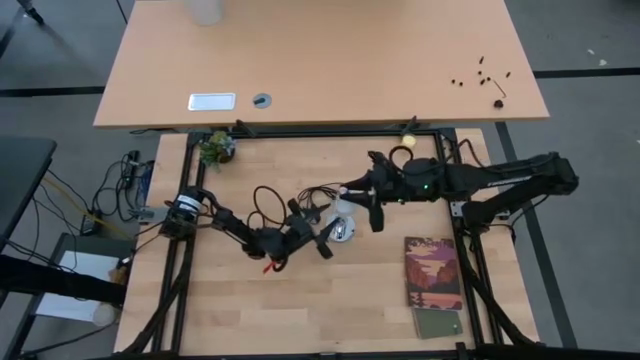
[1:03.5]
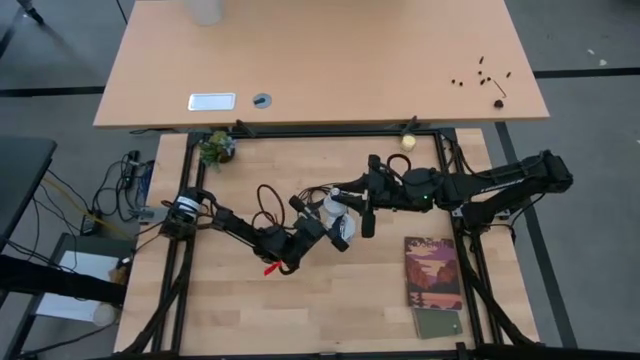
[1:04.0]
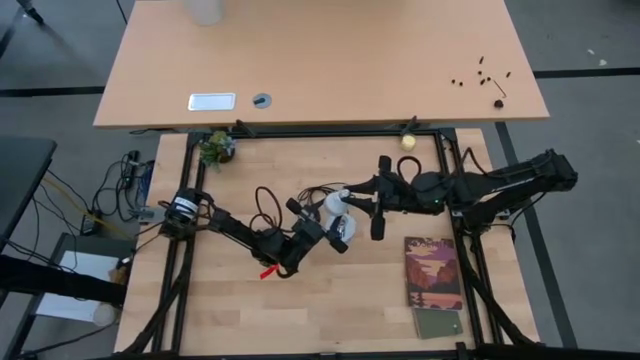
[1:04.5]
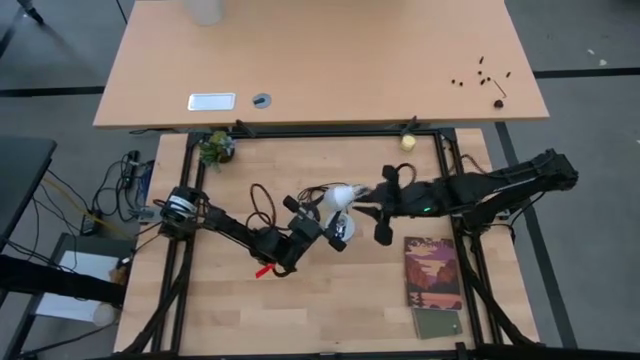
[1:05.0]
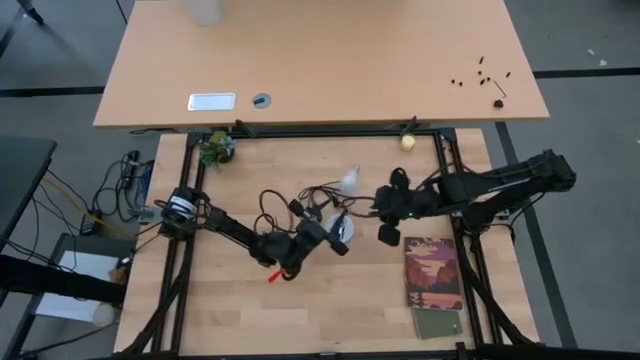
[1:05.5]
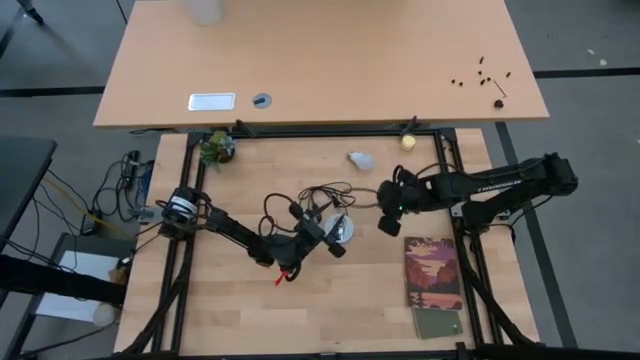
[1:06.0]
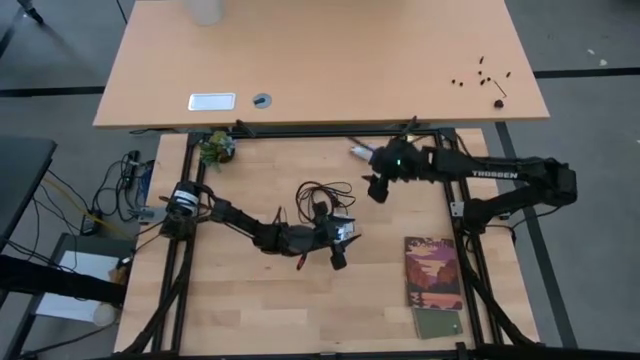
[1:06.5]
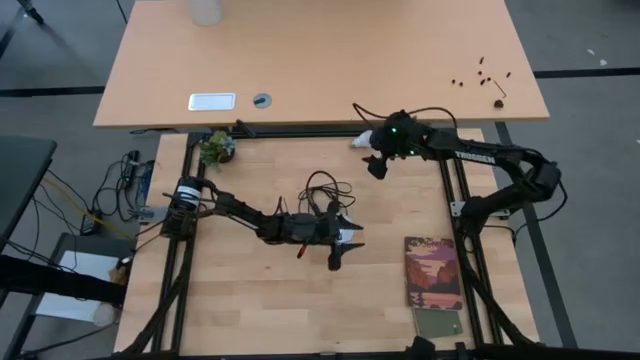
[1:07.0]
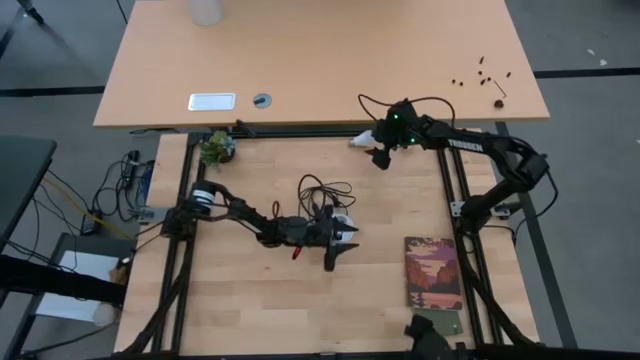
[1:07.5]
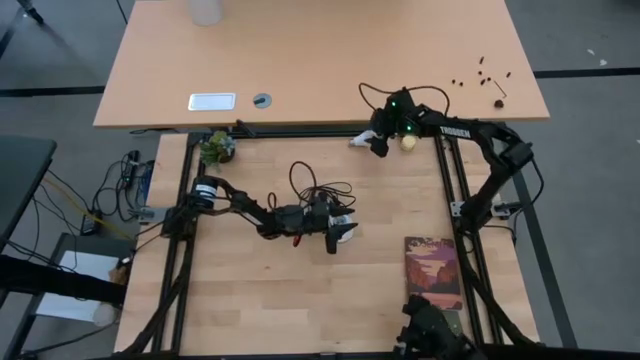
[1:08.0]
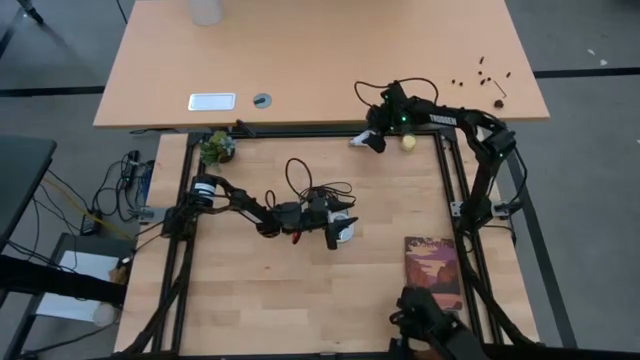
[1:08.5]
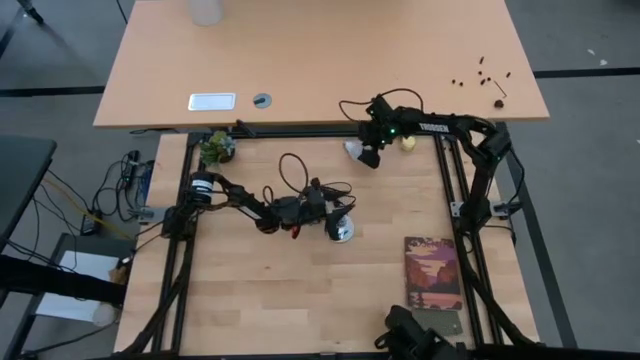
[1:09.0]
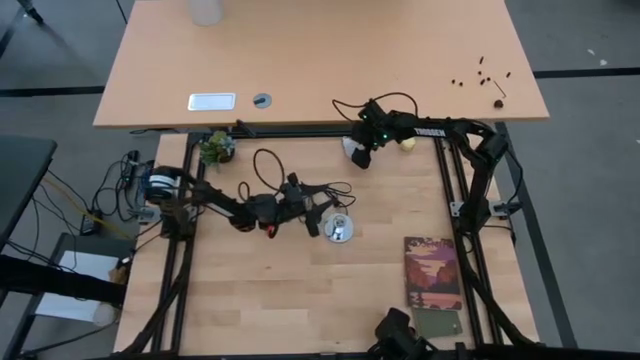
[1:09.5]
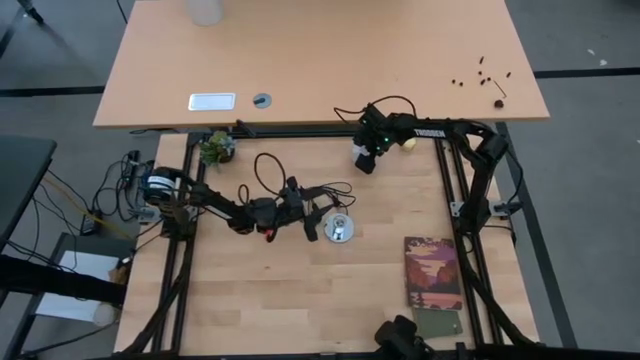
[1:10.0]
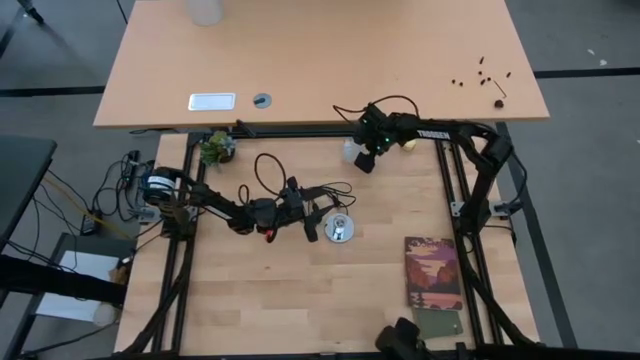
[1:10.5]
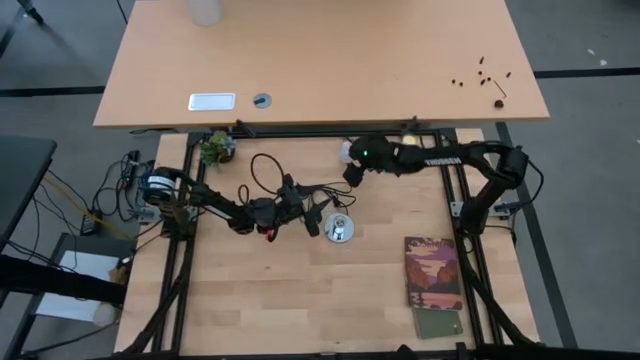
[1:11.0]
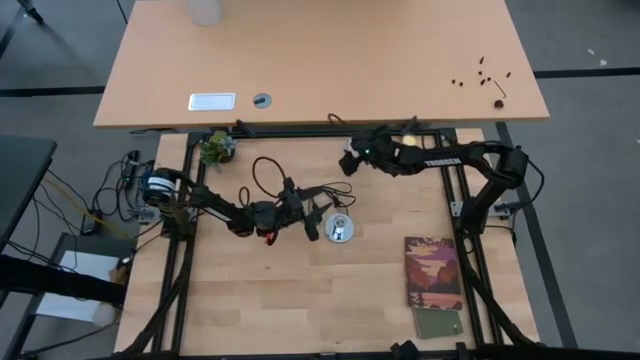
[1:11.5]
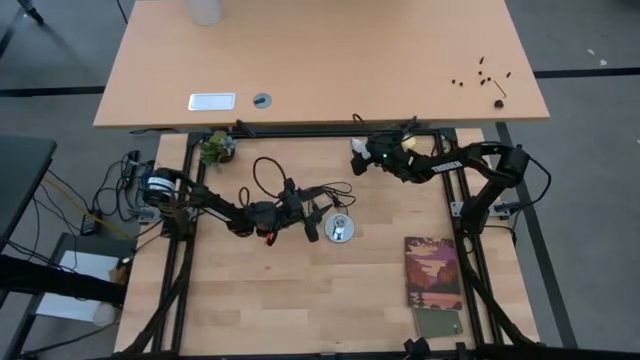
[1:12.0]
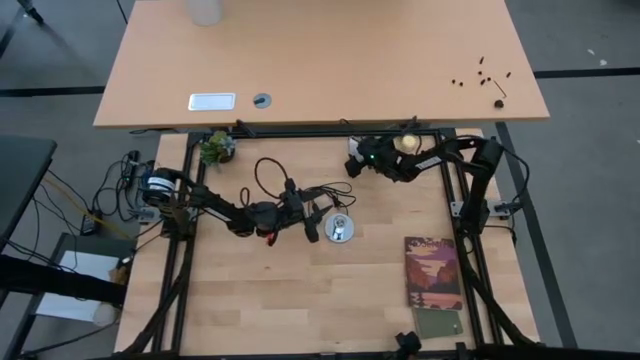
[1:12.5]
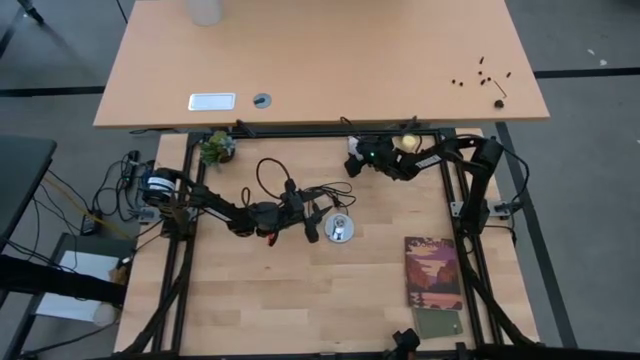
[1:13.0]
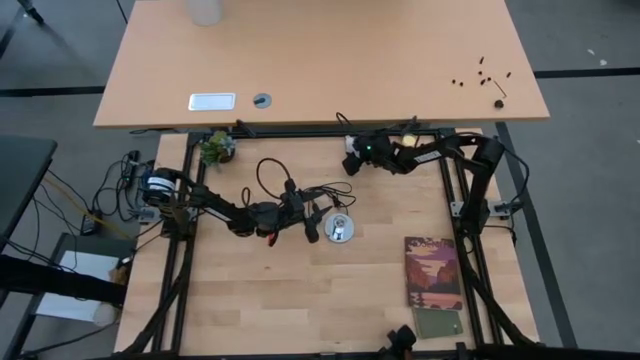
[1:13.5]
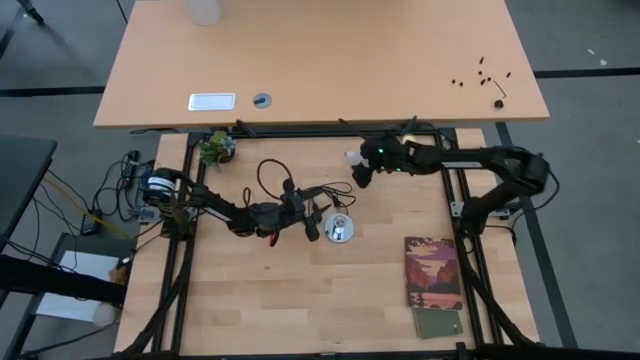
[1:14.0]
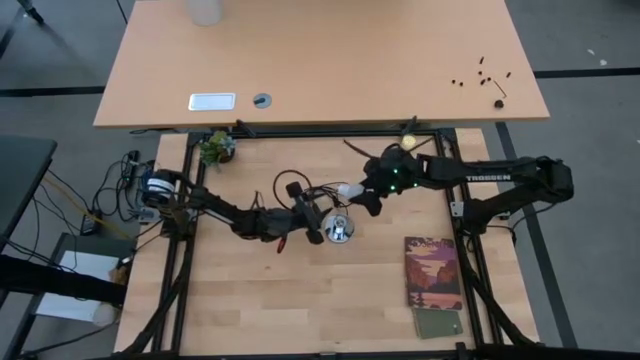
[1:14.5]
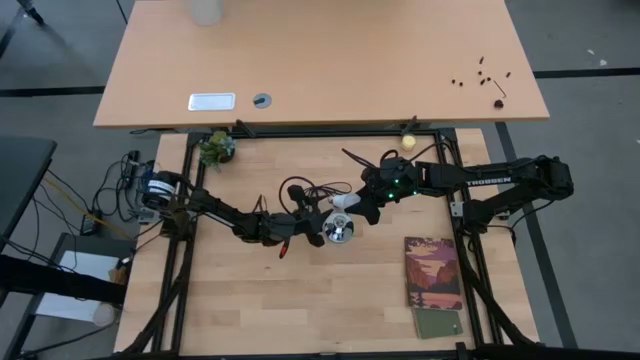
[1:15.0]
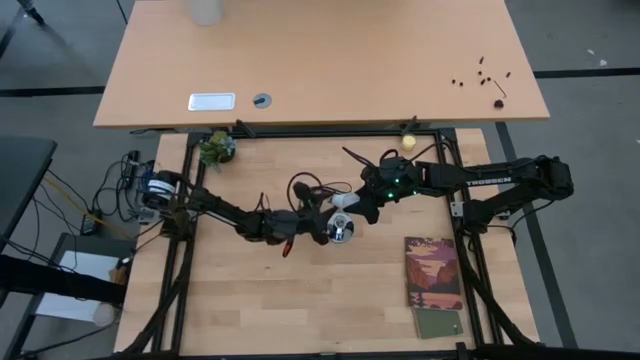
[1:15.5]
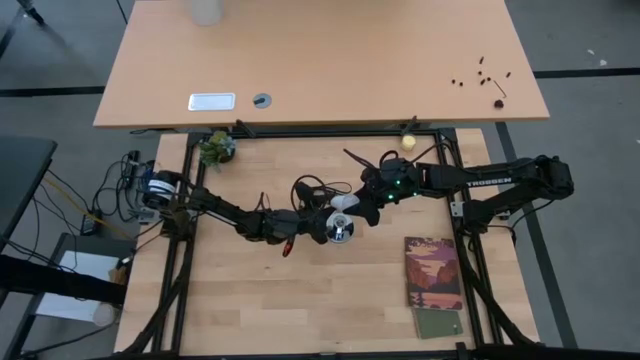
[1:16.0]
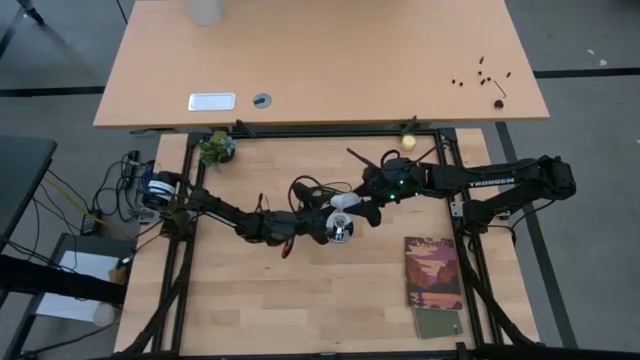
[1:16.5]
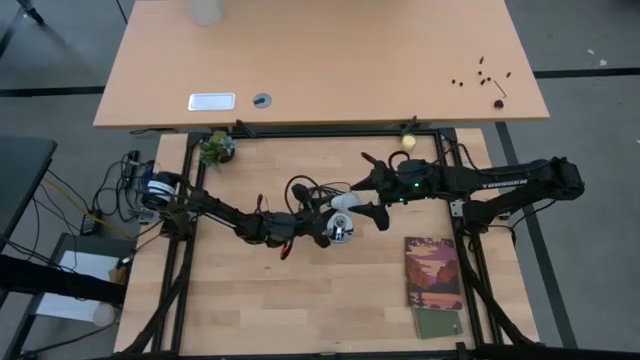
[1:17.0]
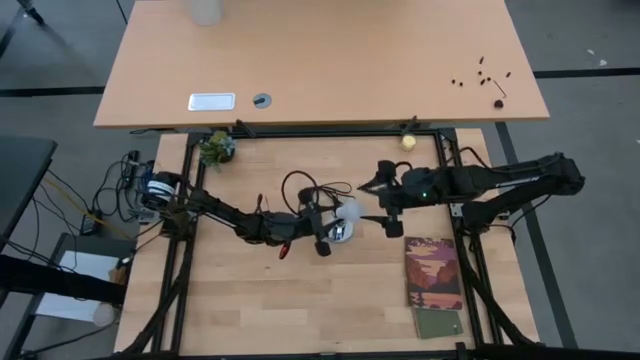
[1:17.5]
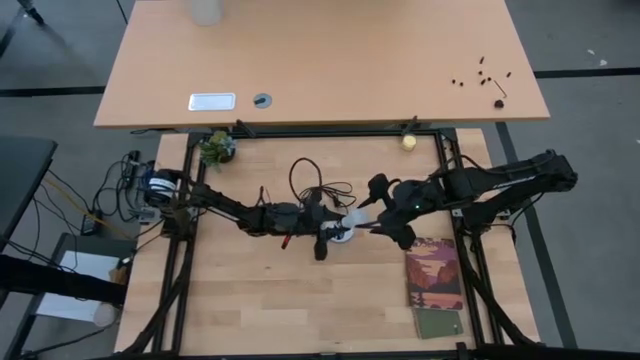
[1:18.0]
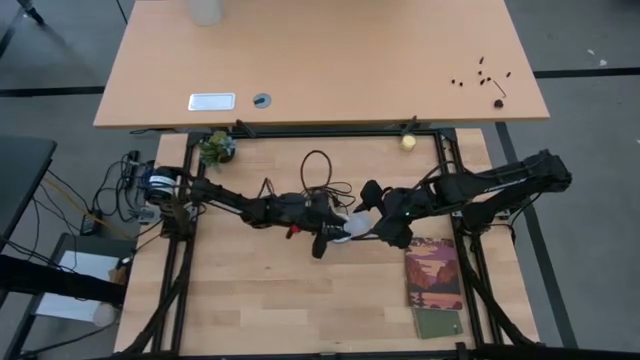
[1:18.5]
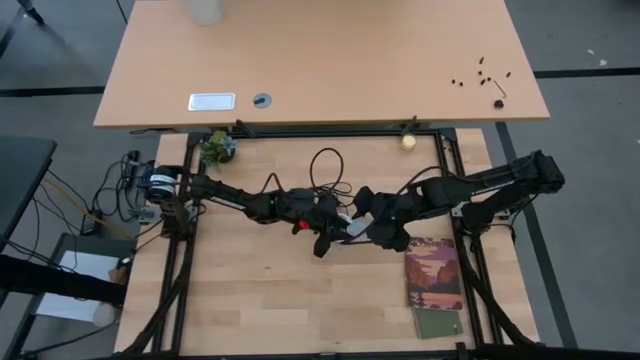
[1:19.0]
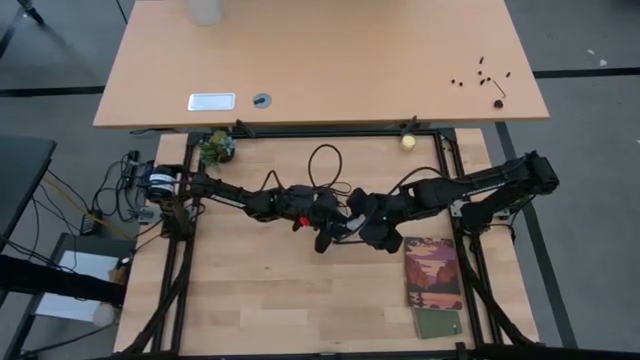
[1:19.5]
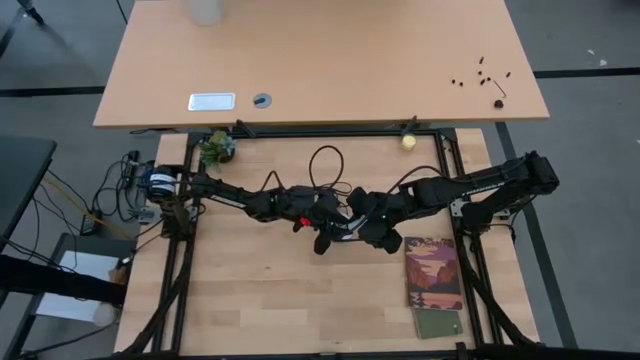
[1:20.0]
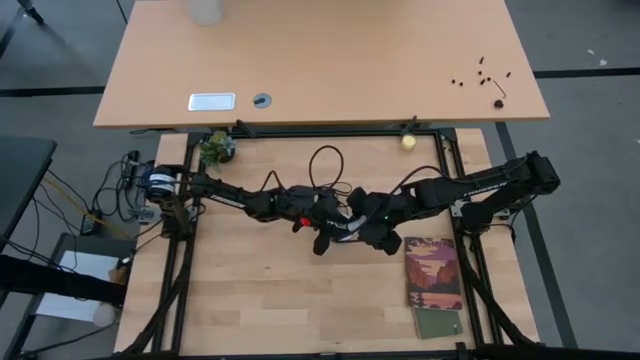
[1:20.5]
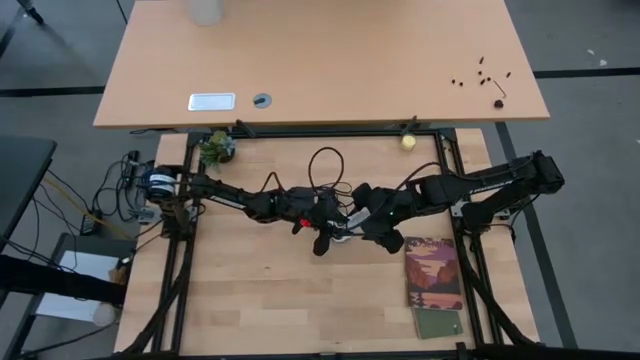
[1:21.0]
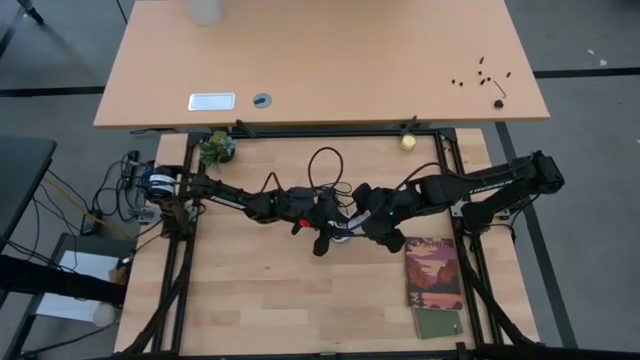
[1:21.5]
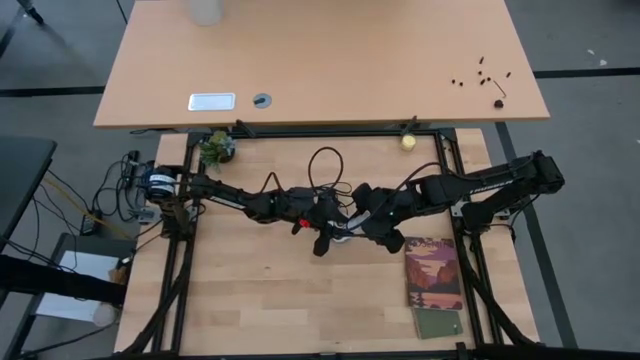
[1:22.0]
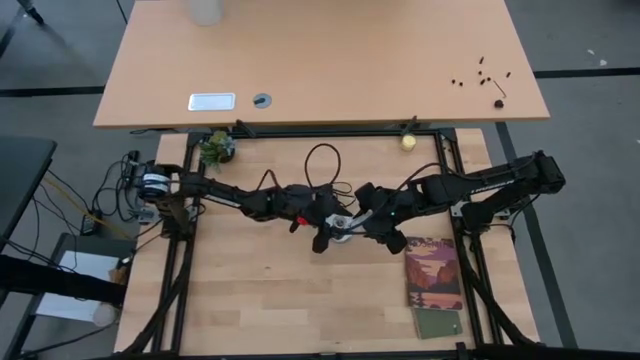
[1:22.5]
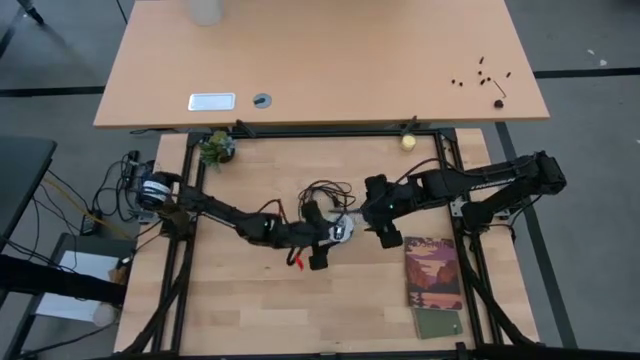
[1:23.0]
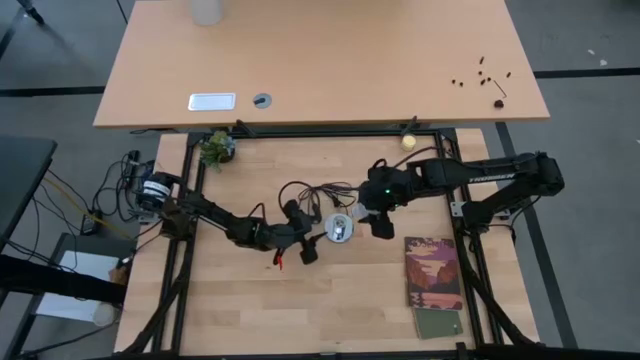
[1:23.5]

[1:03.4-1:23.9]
Task: Screw lightbulb
Insert the white lightbulb into the silver lamp

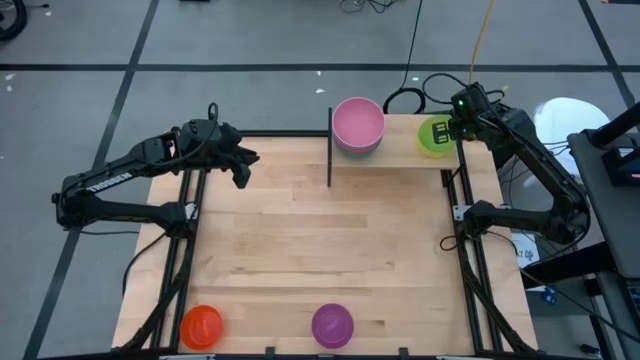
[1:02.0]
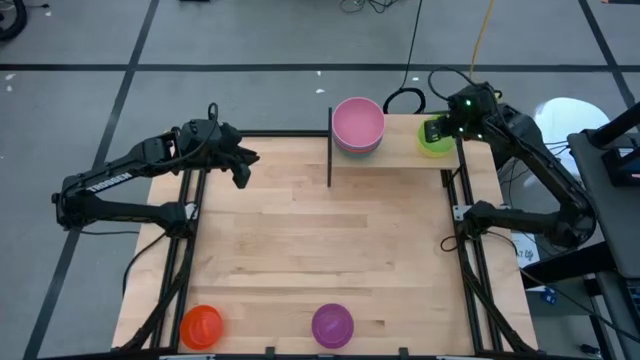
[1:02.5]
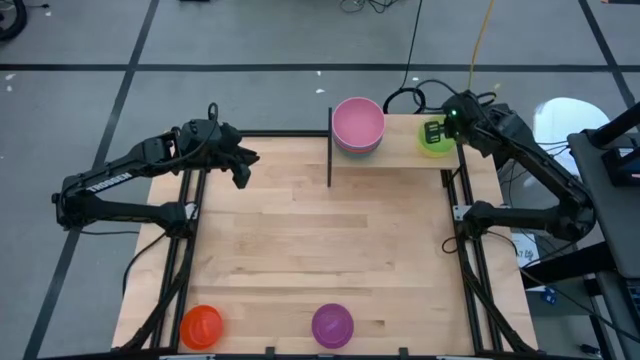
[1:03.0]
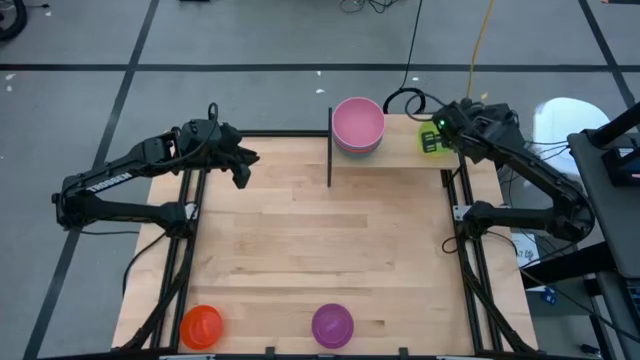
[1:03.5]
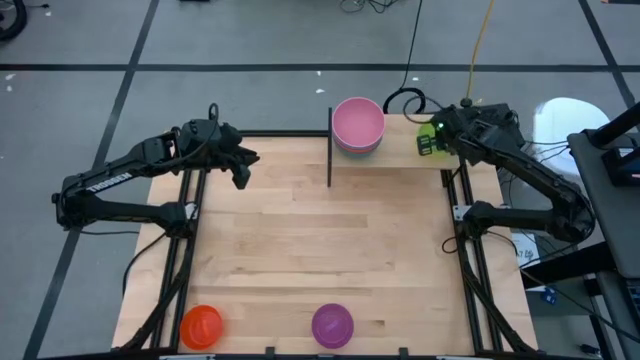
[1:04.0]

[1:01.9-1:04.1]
Task: Place and stack bowls onto a shelf
Adjust the green bowl on top of the yellow bowl on the shelf
